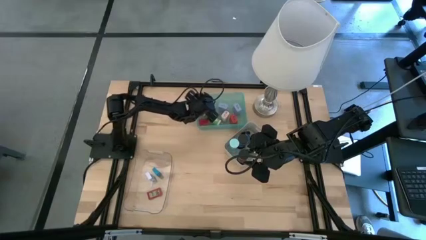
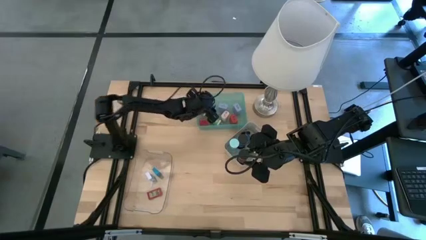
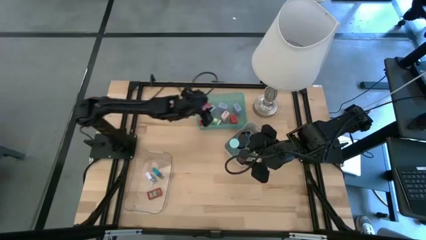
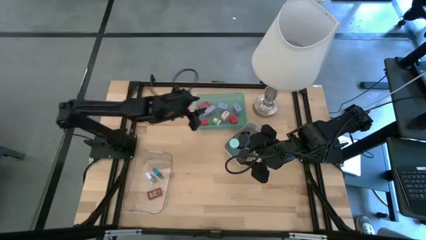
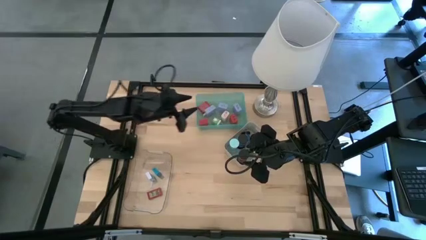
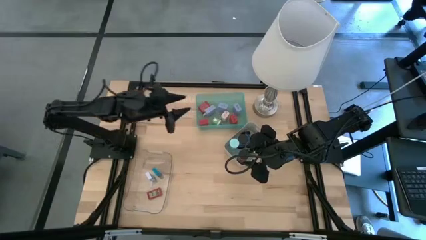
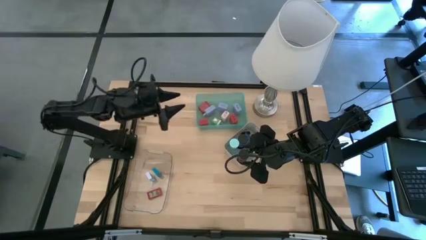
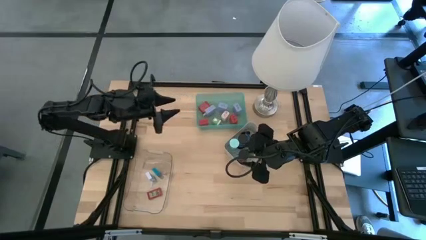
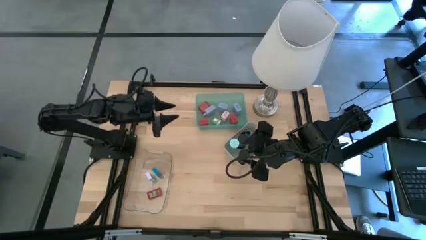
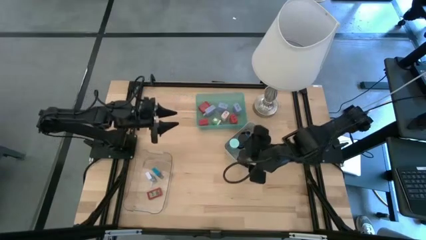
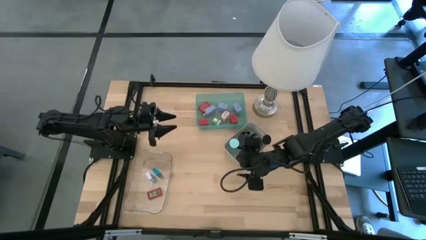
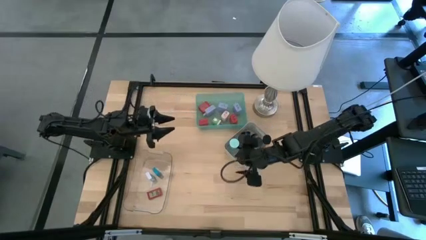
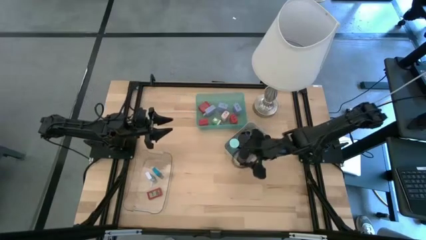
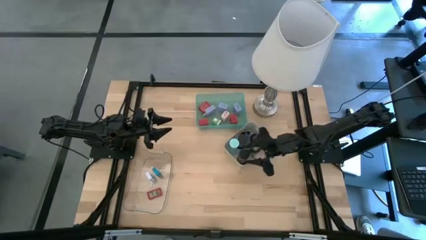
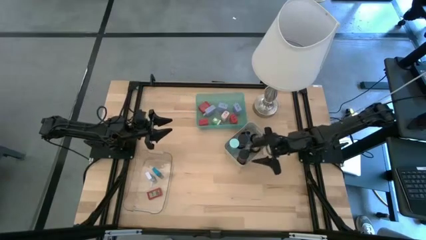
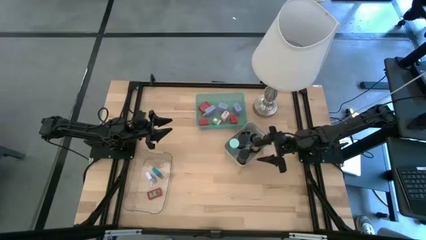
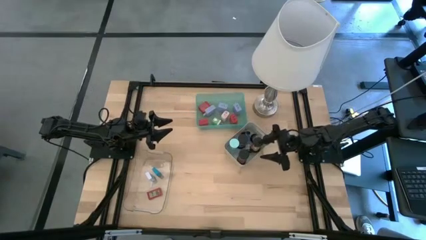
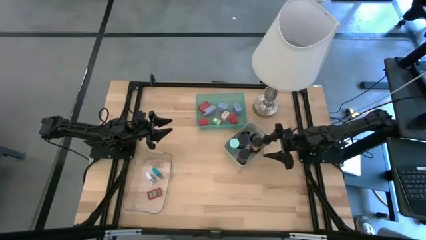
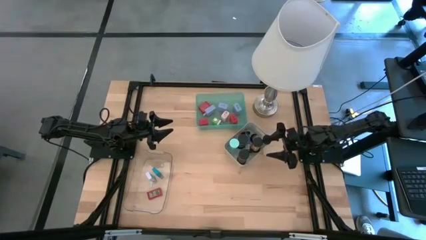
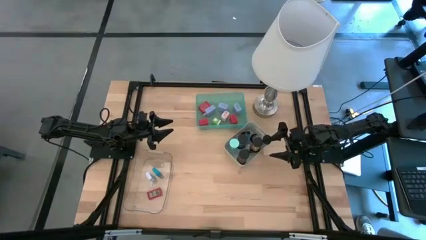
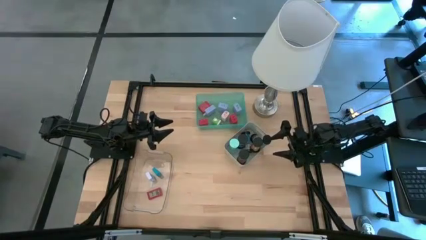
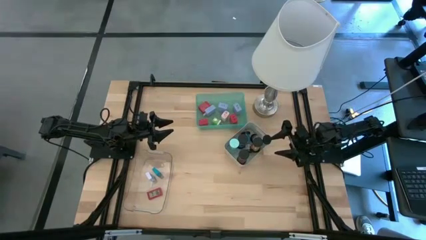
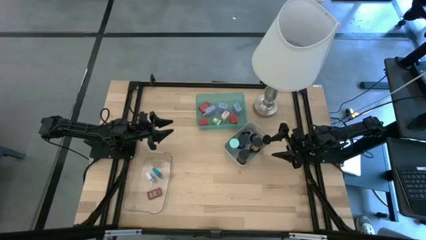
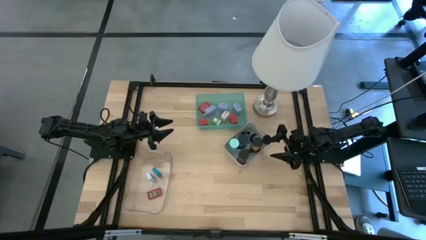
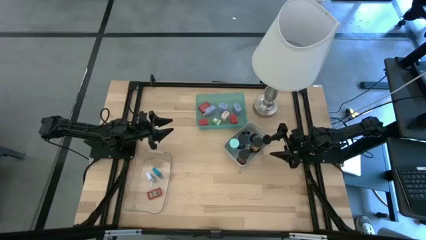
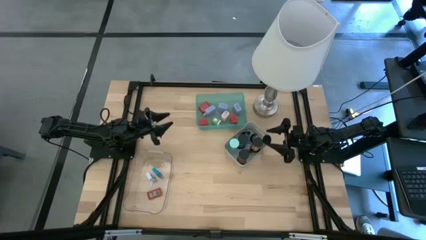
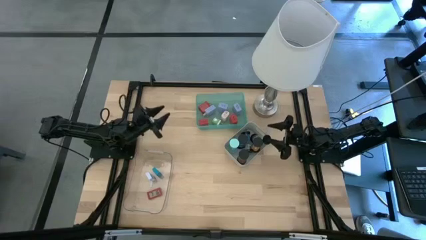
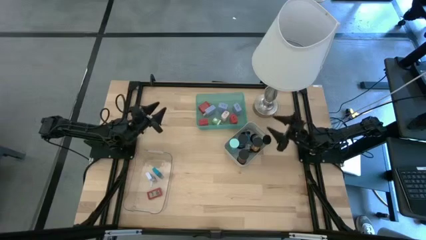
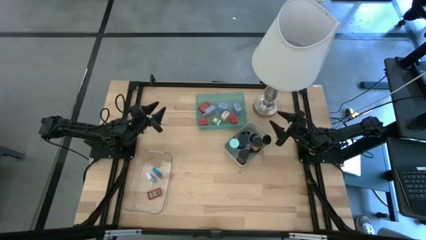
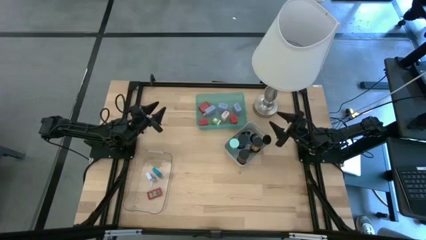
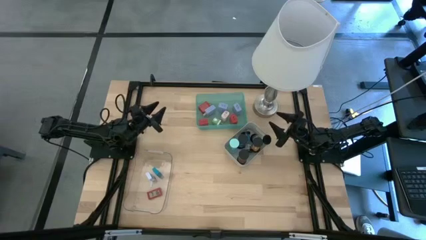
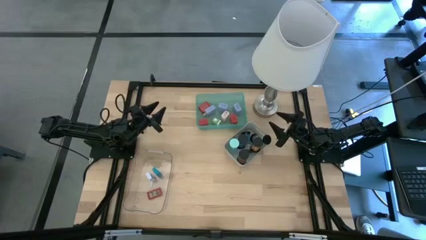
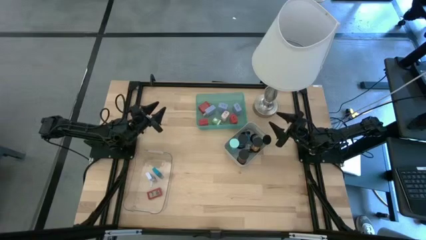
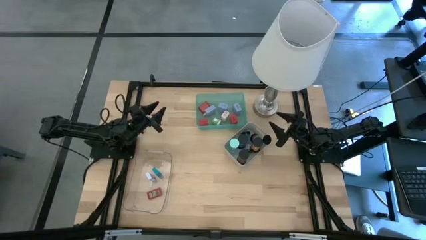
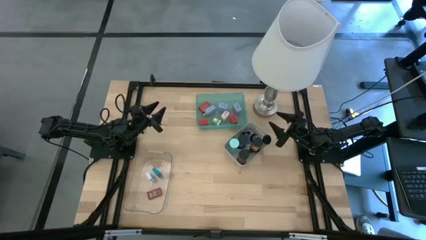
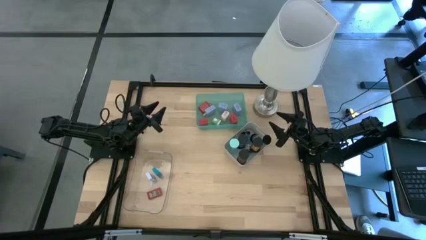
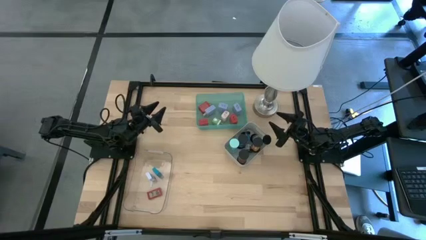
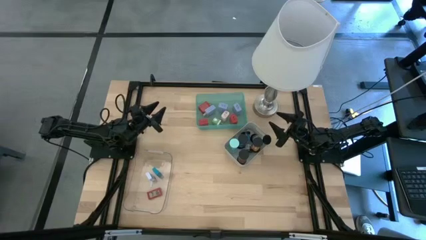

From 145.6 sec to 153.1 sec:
Task: Pick & Place Office items
Return to Home Position

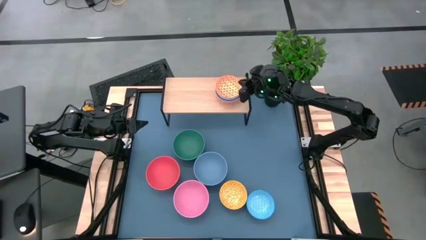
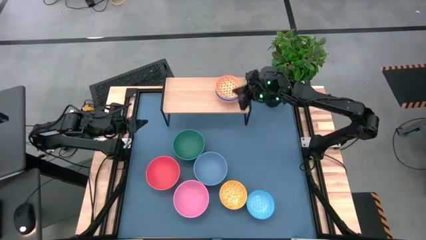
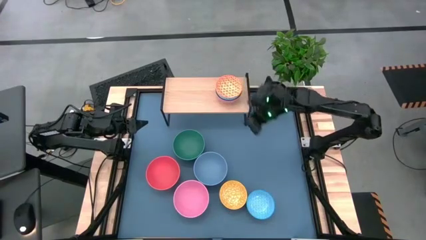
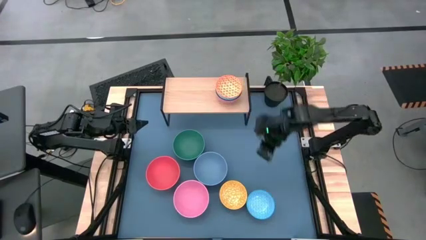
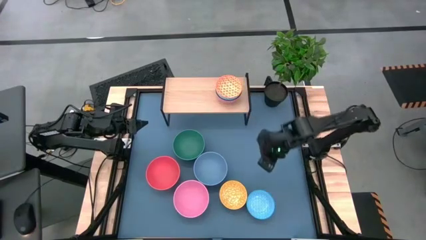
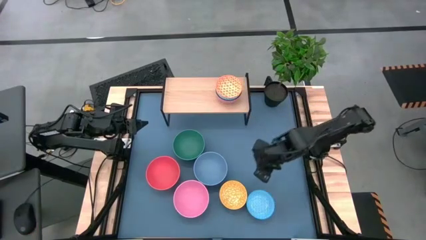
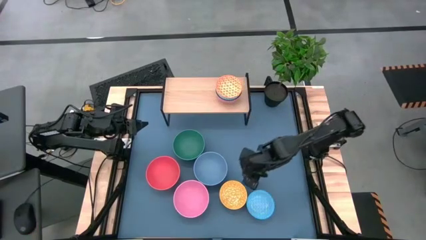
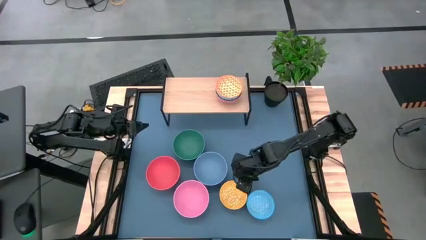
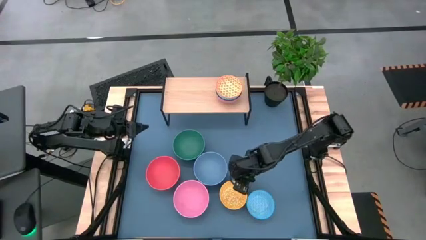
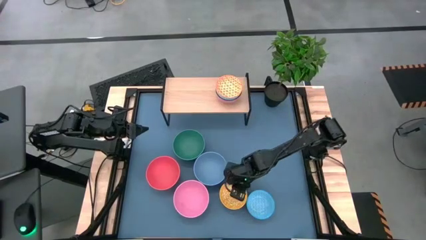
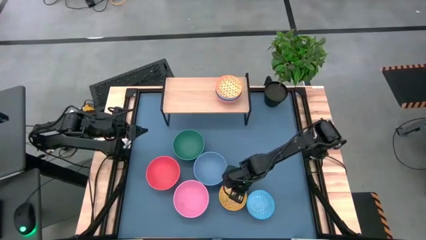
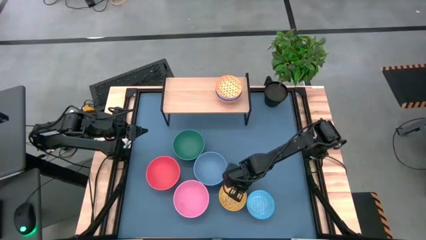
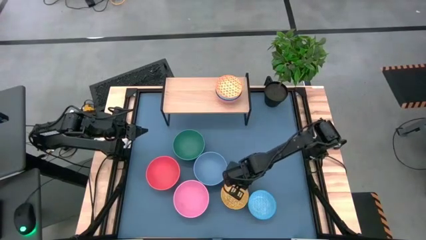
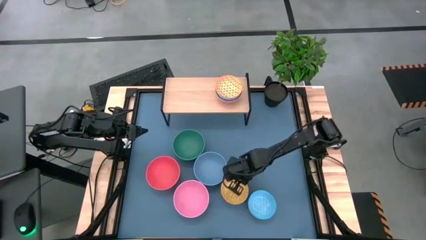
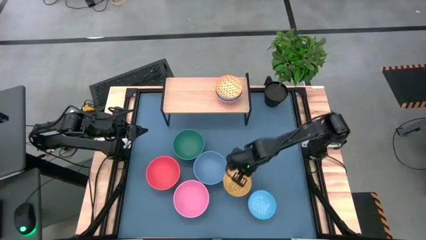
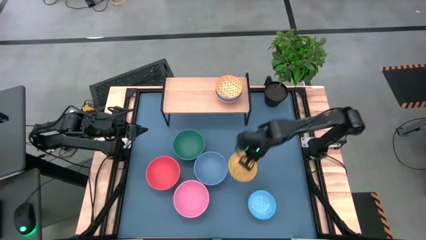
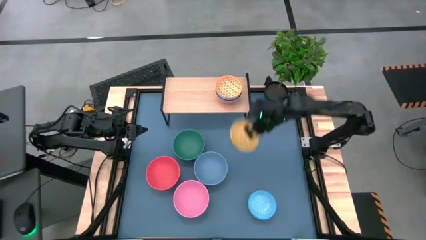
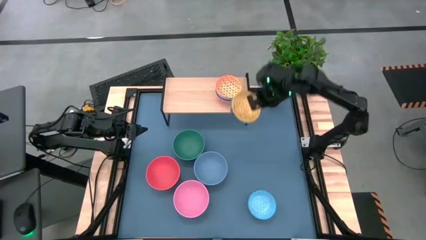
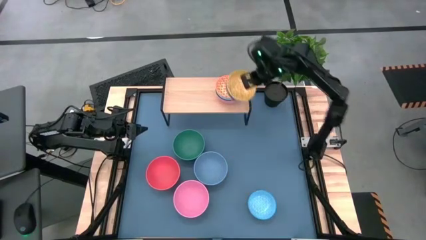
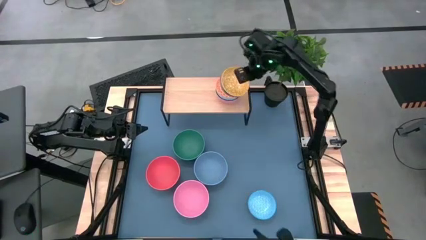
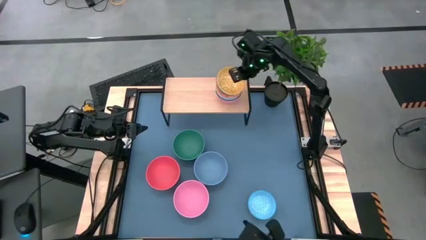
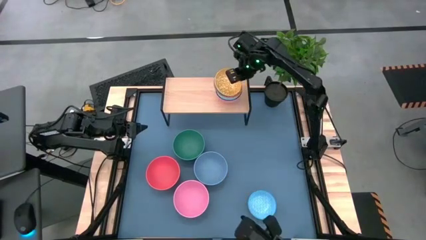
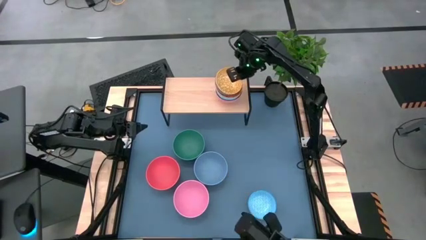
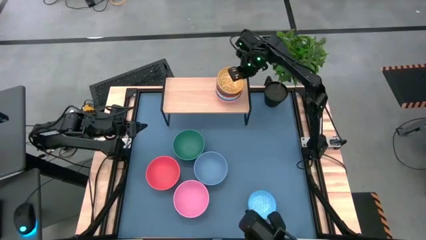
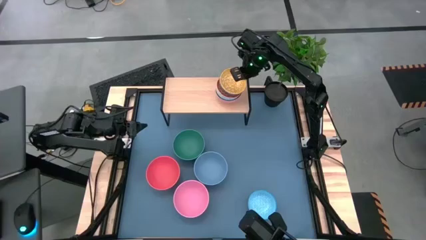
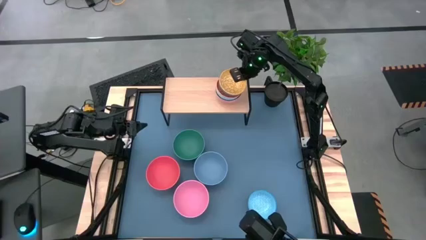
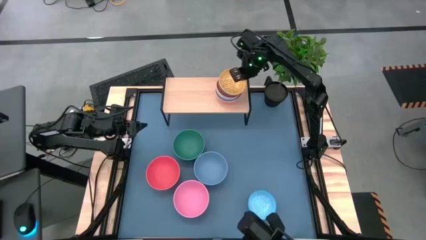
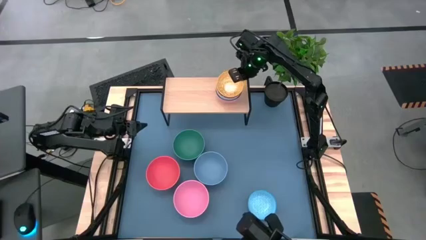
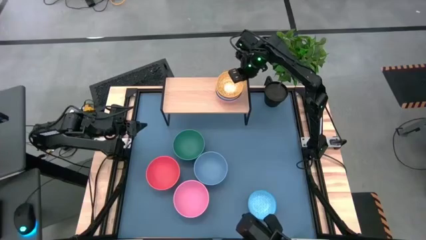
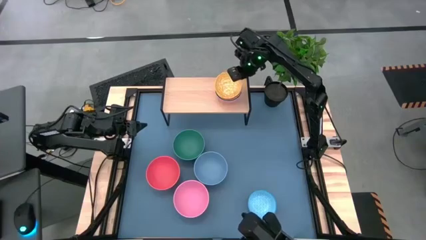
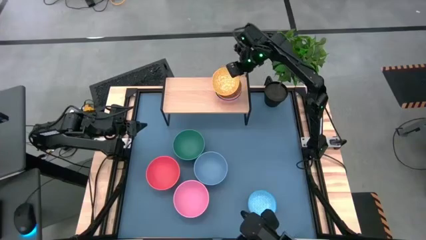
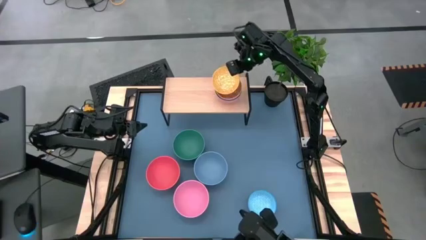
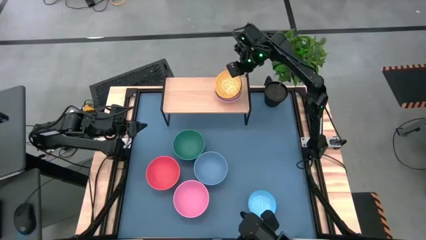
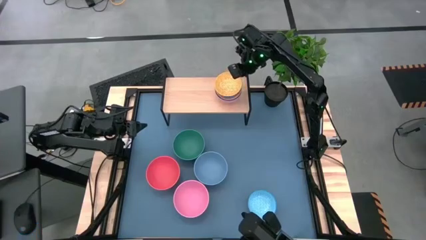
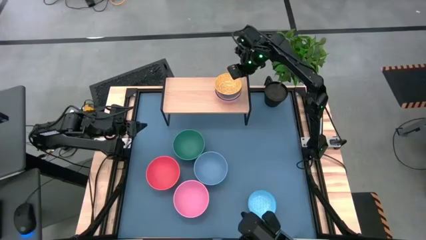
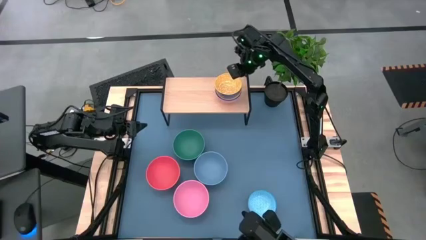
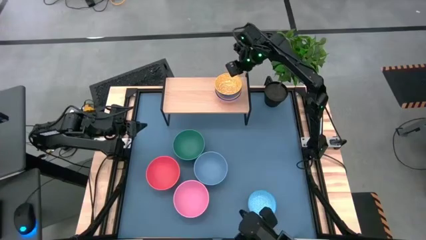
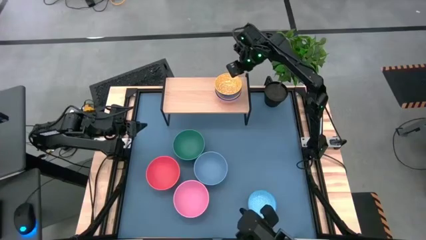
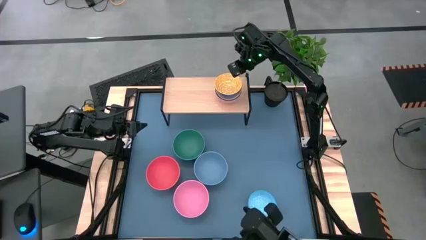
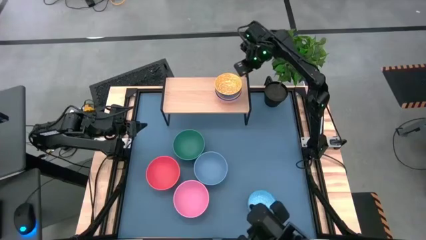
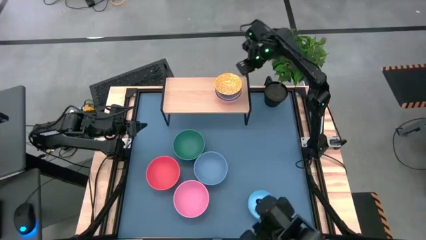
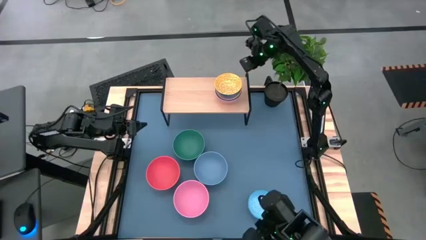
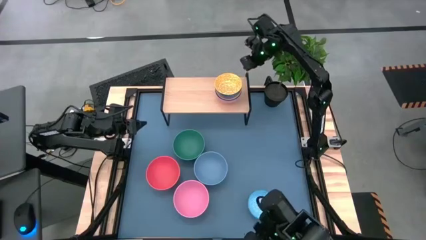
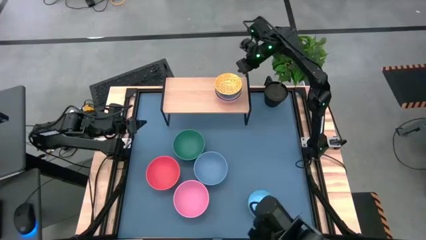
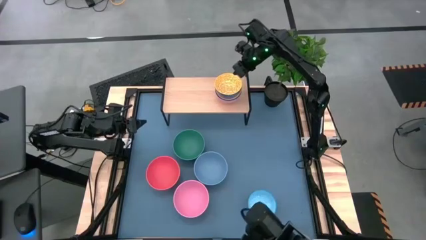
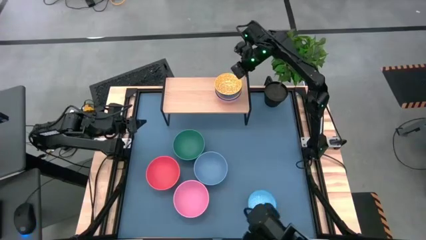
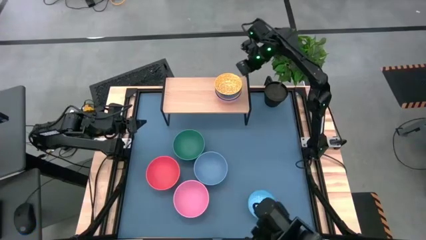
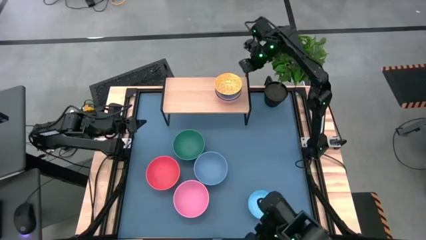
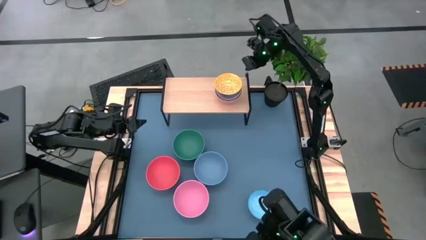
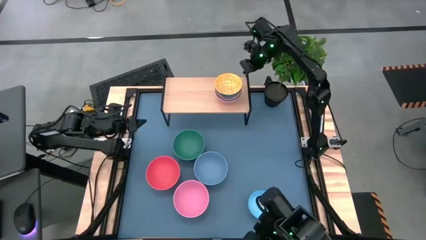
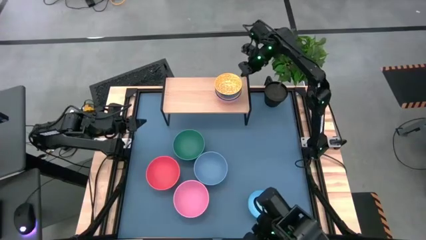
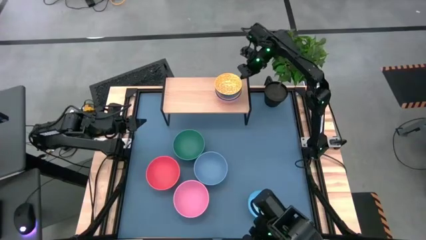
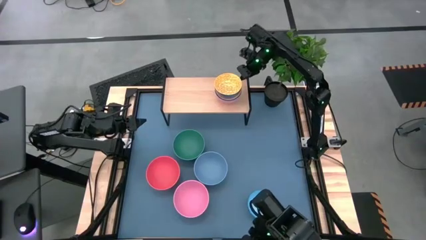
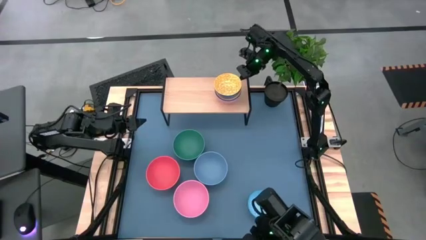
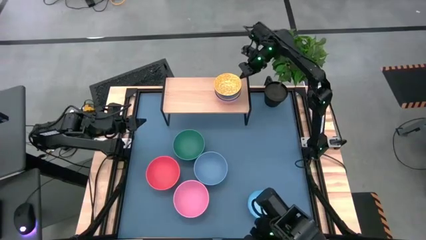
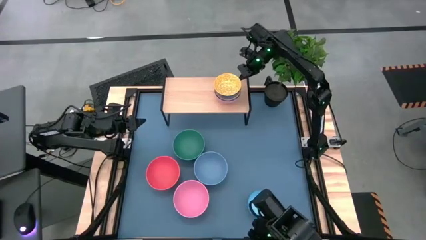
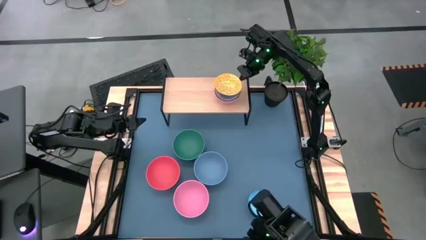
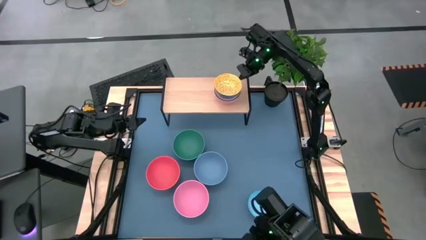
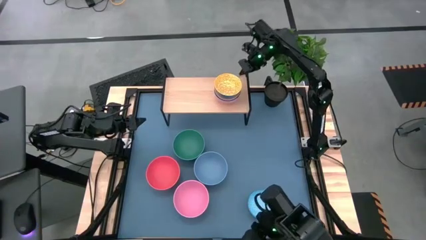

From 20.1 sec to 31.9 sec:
Task: Place and stack bowls onto a shelf
Stack the yellow-patterned bowl on top of the orange-patterned bowl on the shelf
